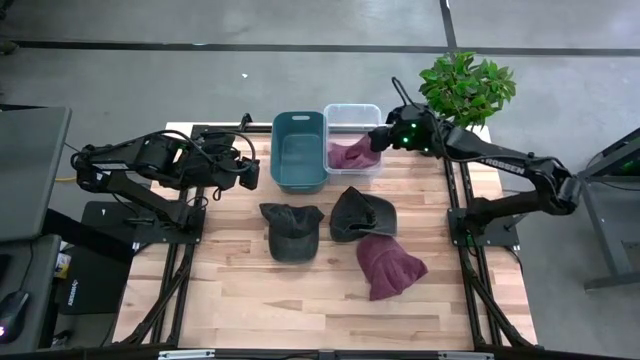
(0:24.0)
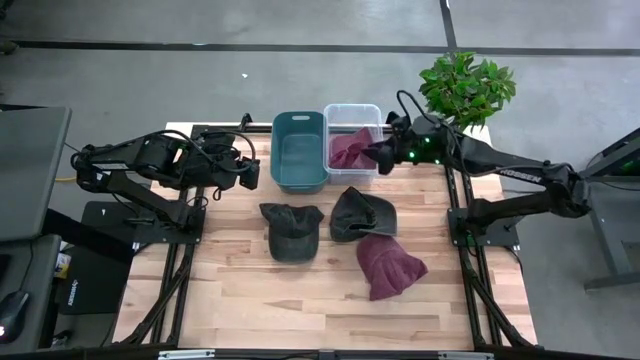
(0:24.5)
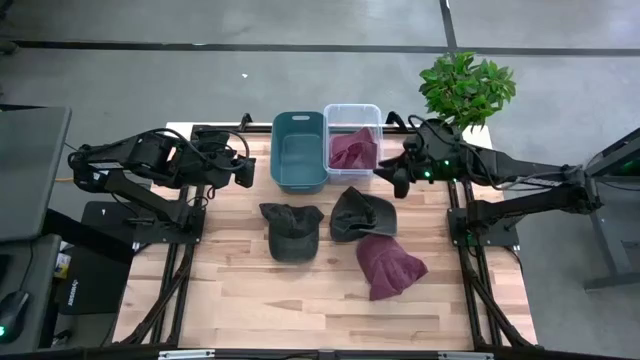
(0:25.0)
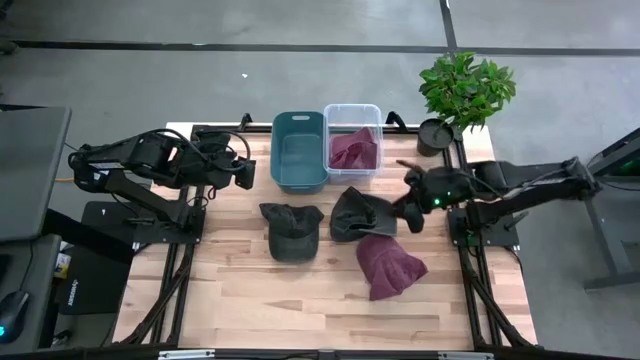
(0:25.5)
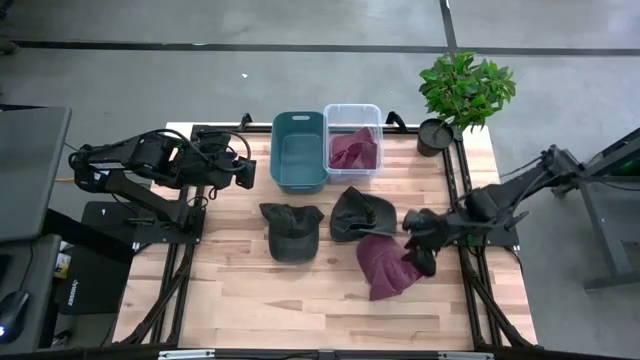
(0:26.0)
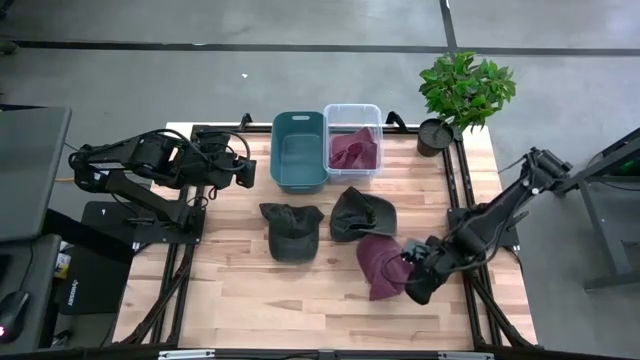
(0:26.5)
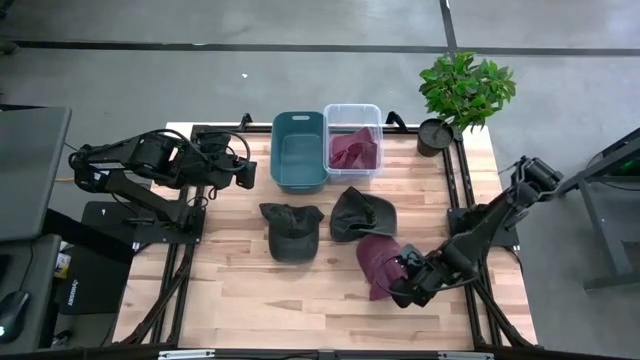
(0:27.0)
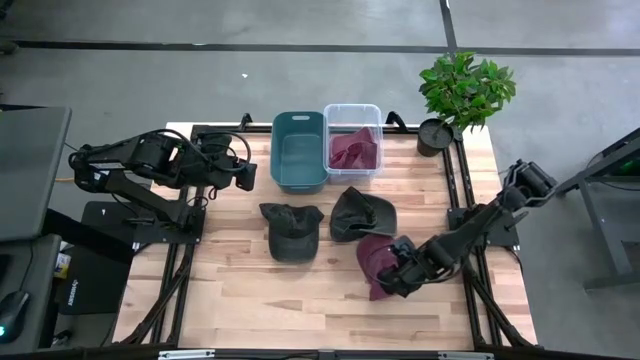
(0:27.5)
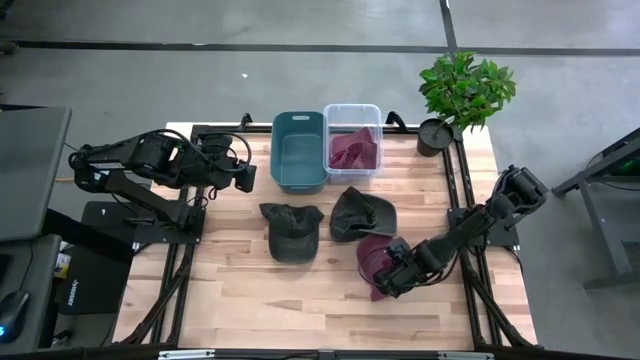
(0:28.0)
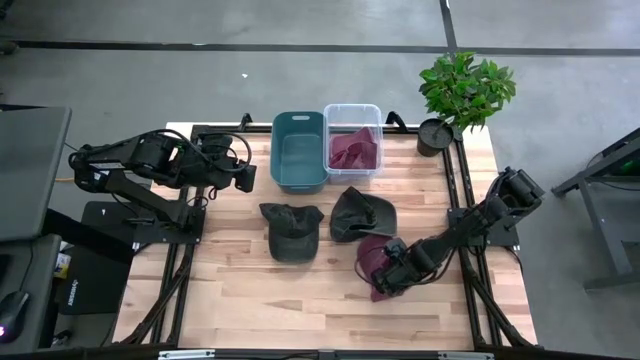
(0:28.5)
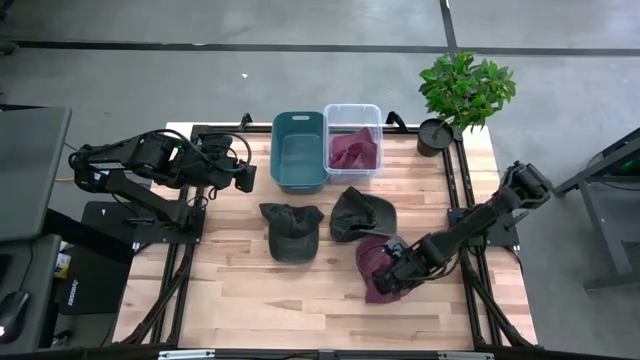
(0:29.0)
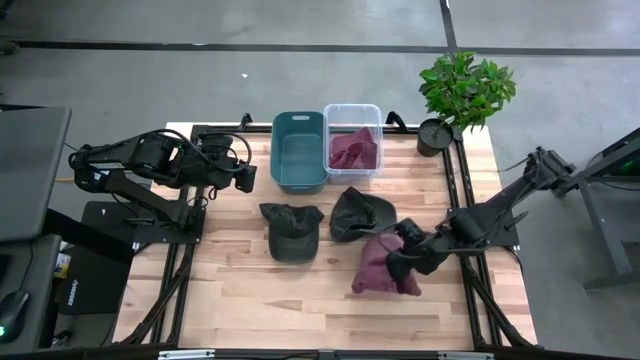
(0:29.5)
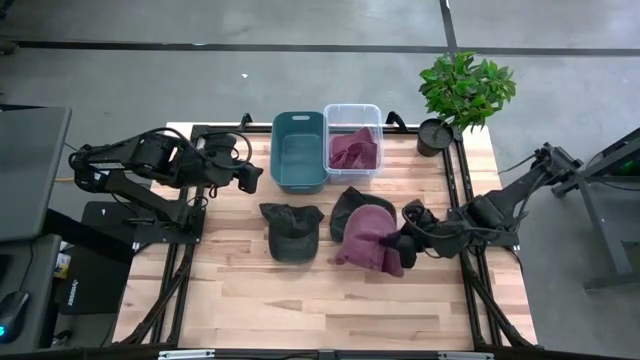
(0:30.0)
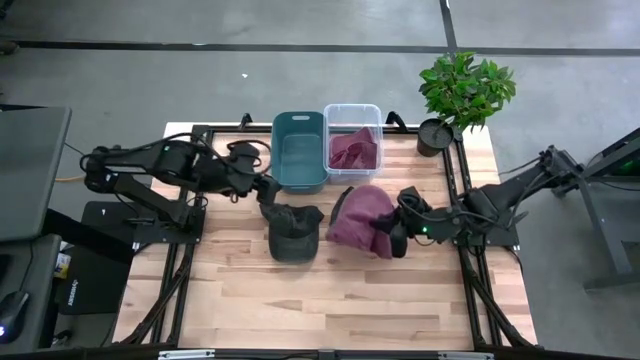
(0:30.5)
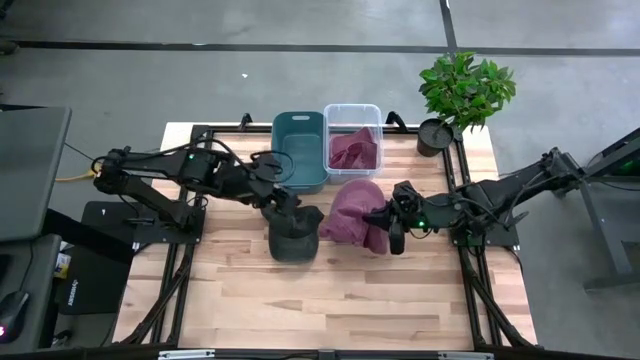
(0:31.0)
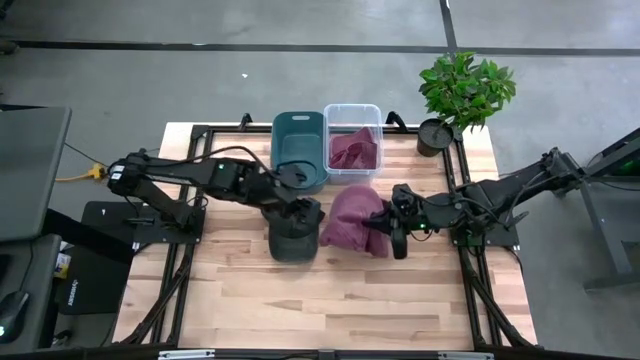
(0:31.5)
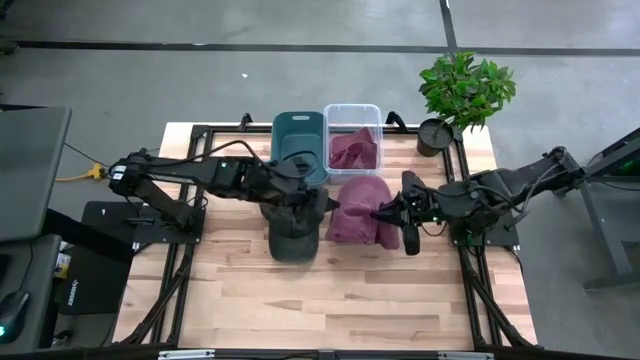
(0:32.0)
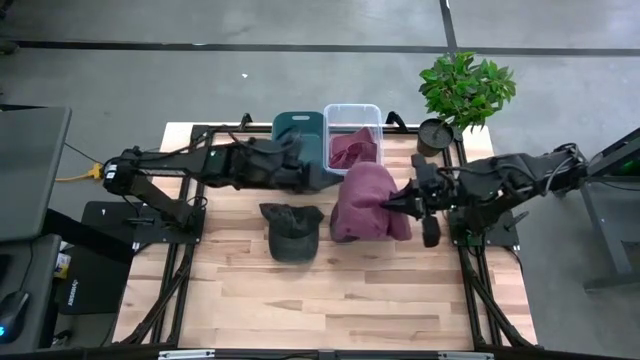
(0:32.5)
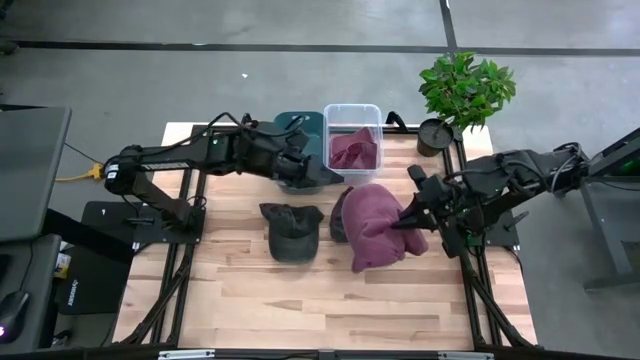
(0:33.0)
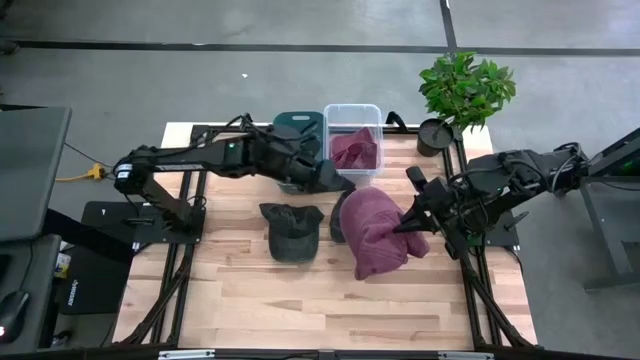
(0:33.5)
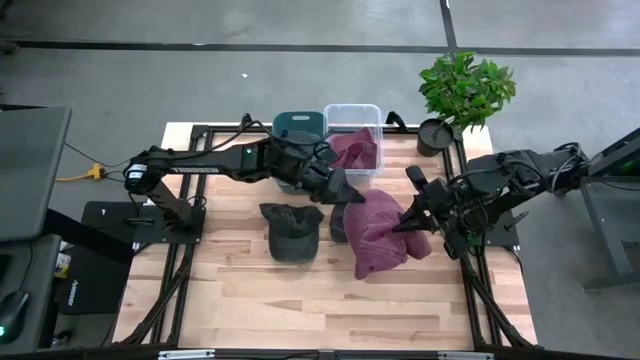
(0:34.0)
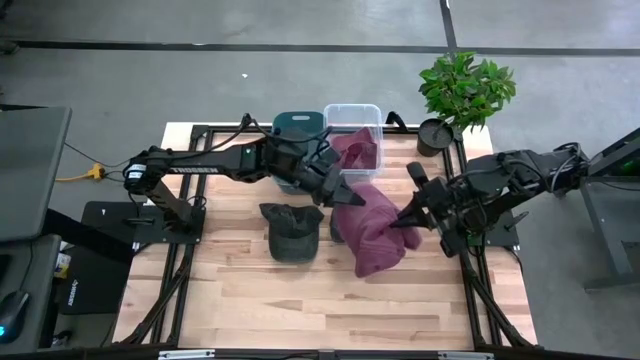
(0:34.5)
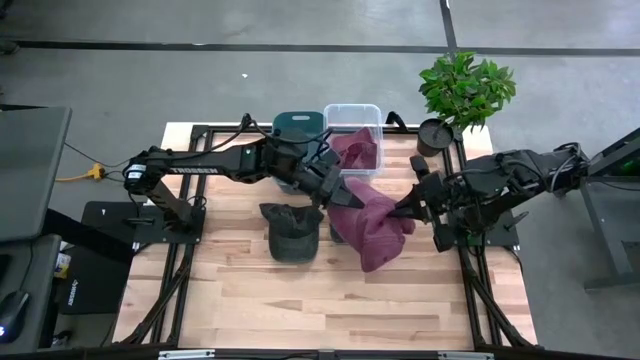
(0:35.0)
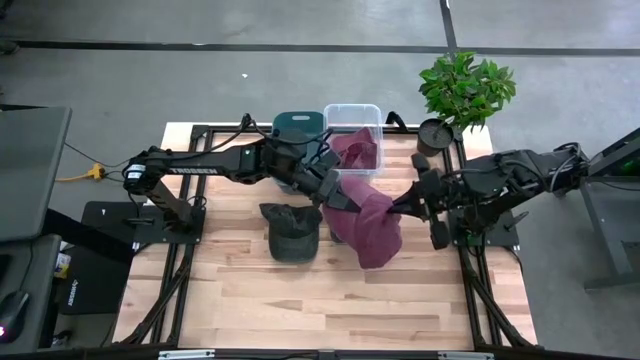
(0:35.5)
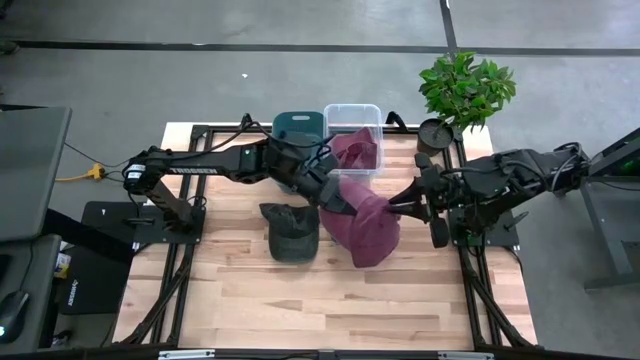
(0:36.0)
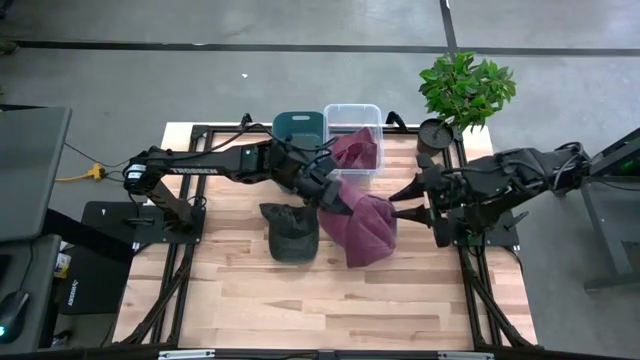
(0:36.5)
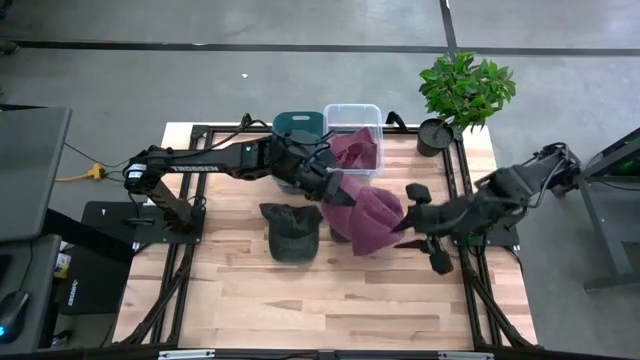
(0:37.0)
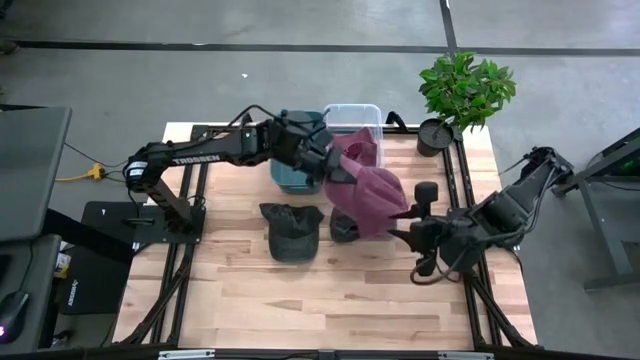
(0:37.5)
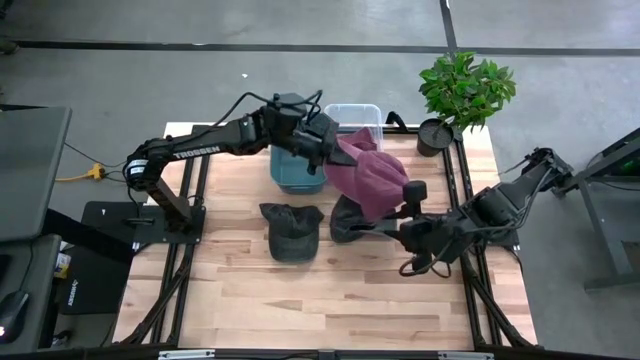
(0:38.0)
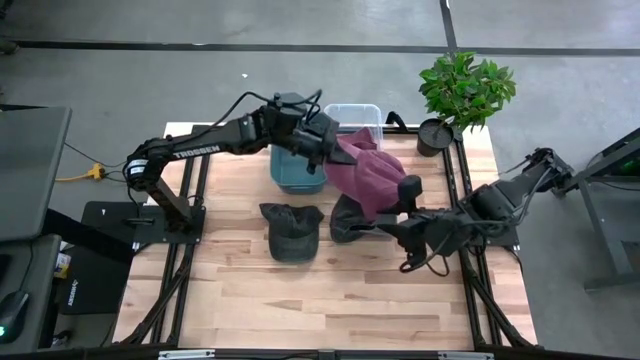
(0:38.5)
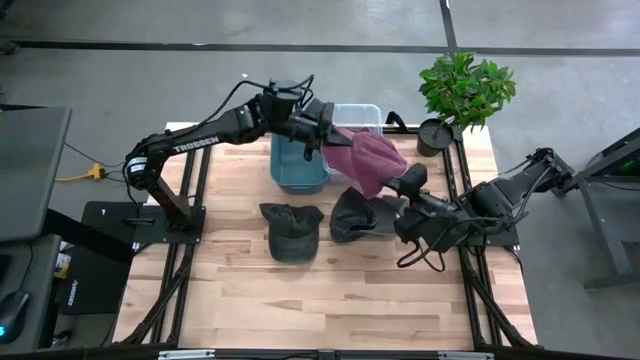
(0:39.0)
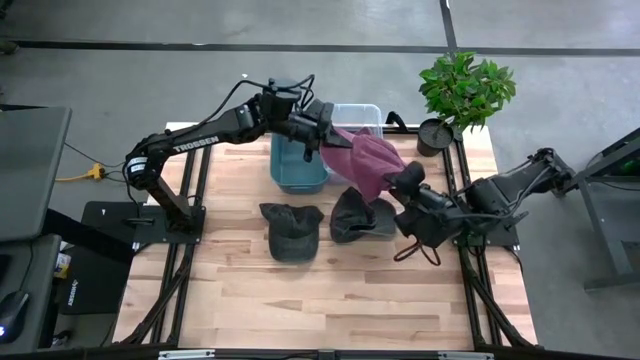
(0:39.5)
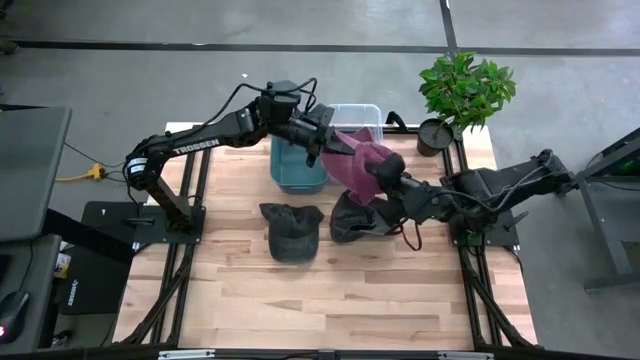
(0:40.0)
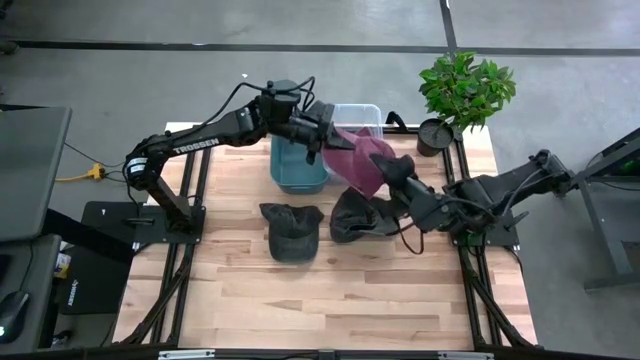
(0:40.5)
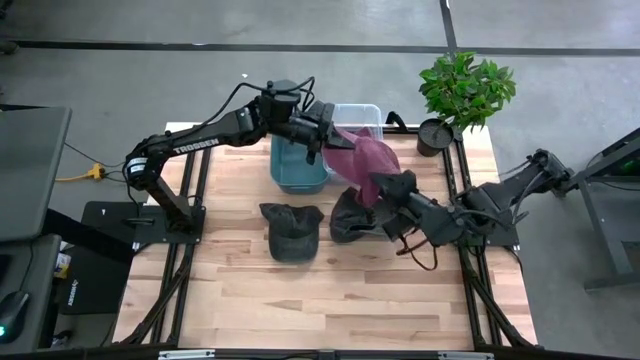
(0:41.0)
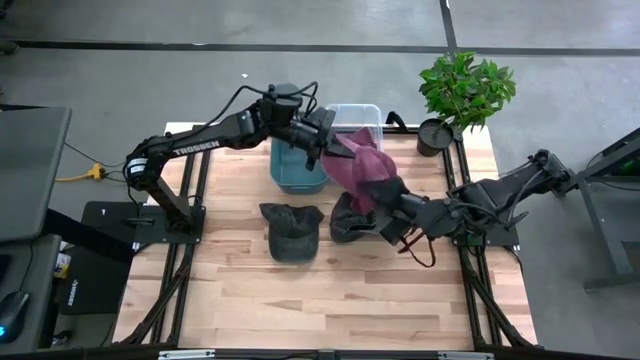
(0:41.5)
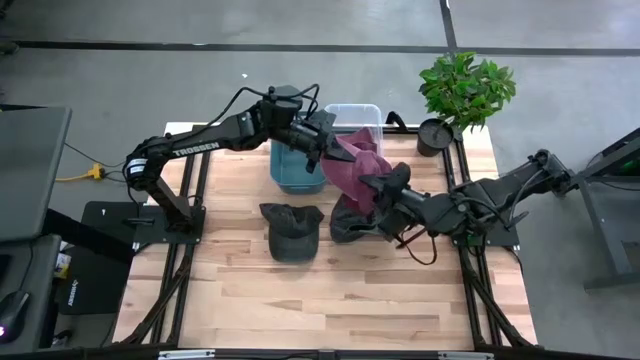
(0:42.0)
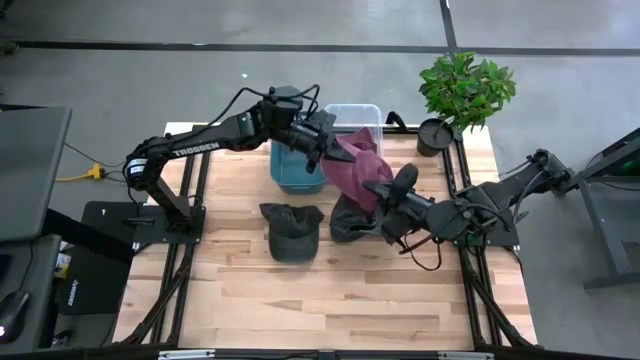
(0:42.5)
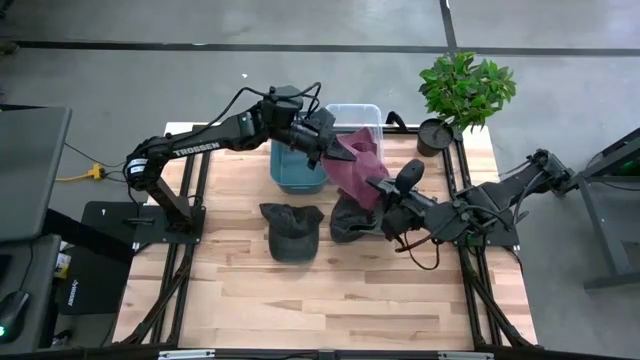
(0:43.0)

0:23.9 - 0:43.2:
Task: Pick & Place hat
Put the red cap into the transparent bin
